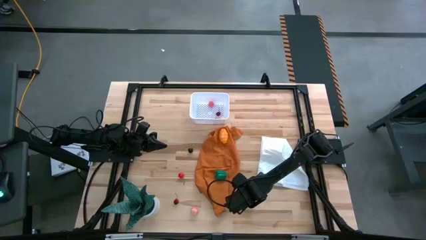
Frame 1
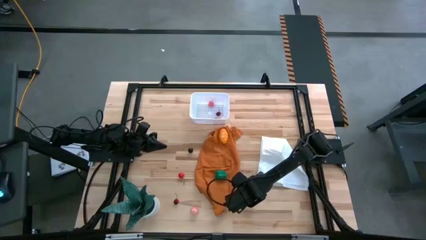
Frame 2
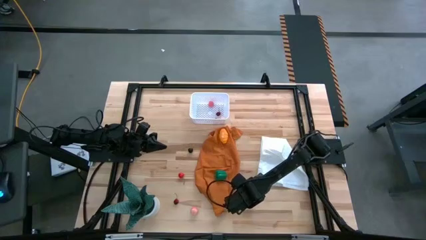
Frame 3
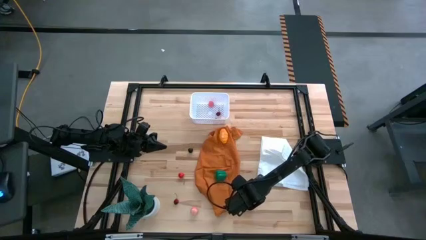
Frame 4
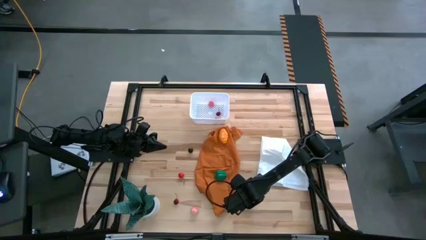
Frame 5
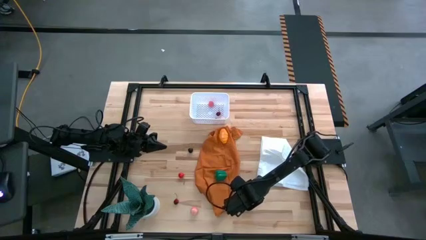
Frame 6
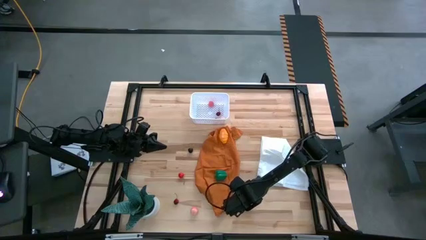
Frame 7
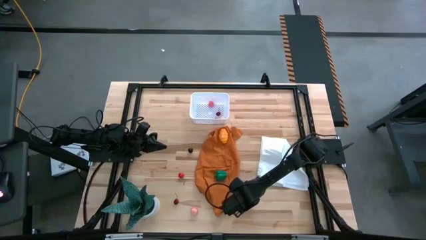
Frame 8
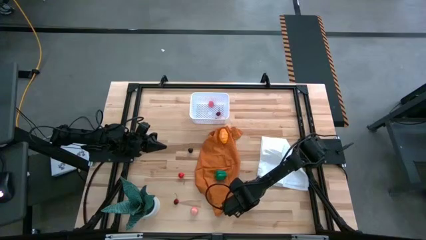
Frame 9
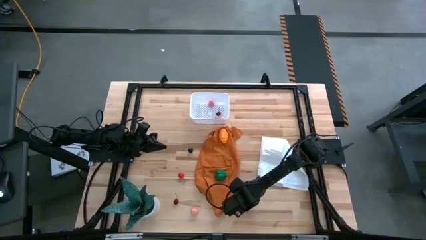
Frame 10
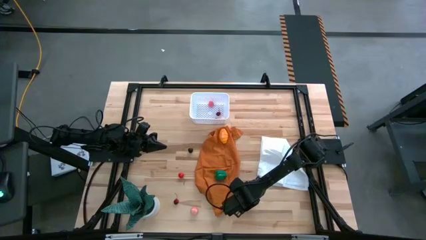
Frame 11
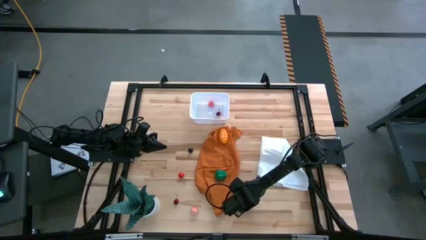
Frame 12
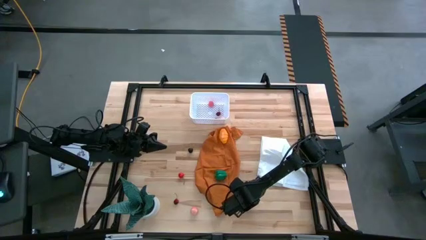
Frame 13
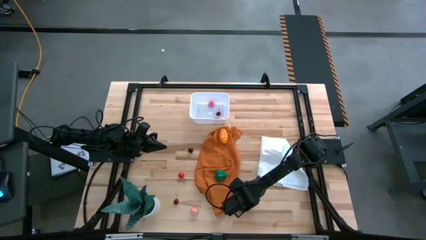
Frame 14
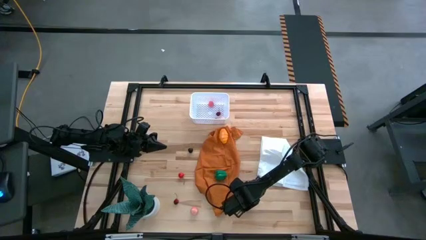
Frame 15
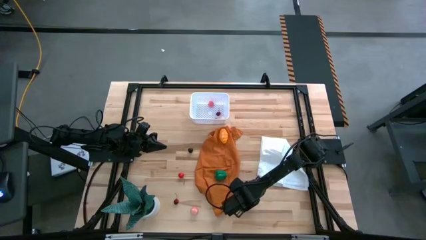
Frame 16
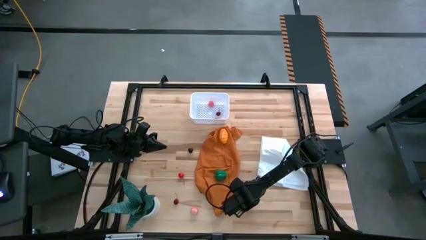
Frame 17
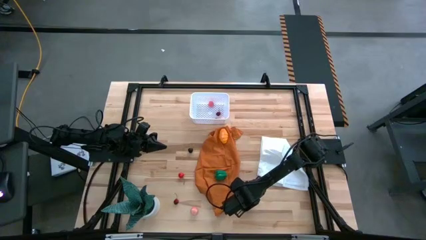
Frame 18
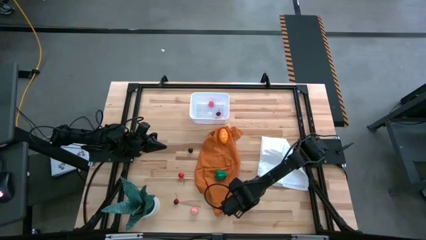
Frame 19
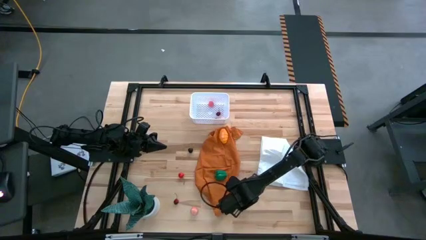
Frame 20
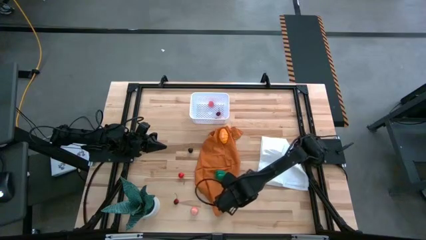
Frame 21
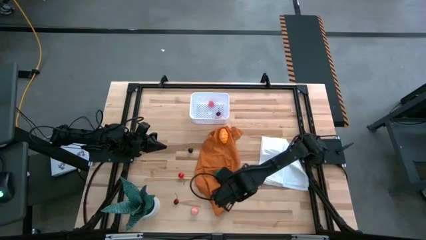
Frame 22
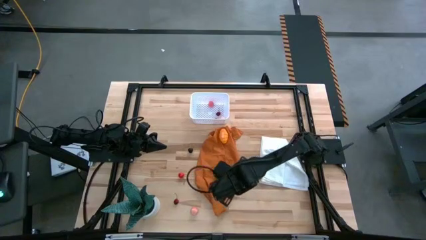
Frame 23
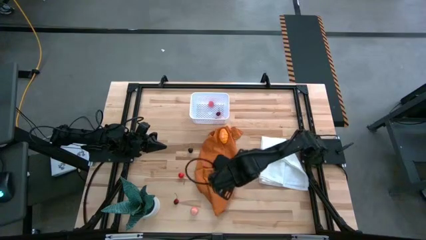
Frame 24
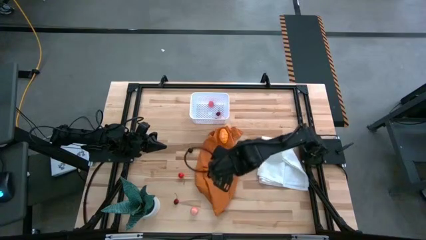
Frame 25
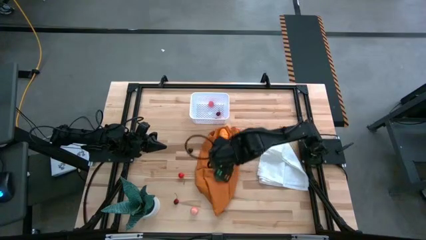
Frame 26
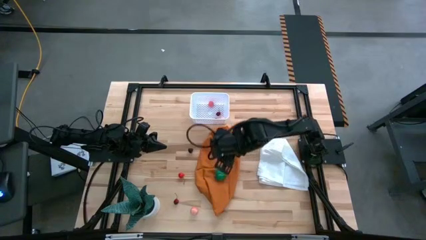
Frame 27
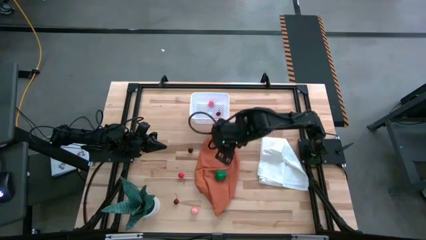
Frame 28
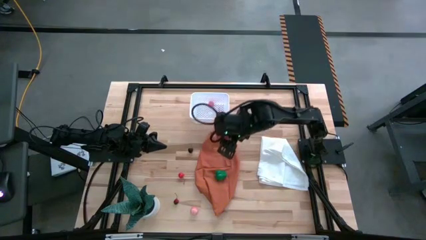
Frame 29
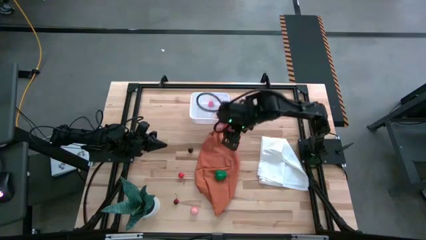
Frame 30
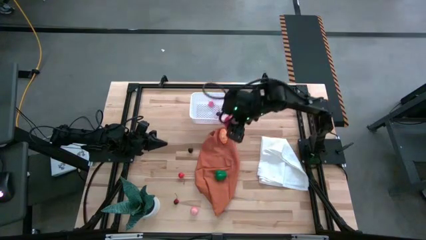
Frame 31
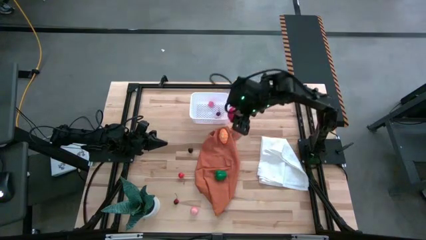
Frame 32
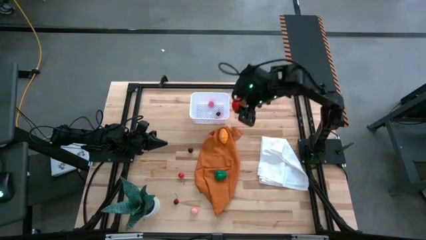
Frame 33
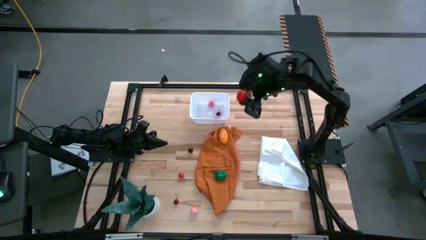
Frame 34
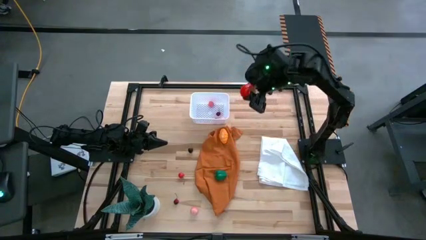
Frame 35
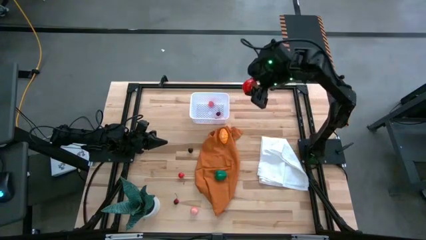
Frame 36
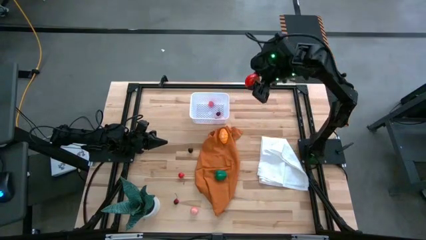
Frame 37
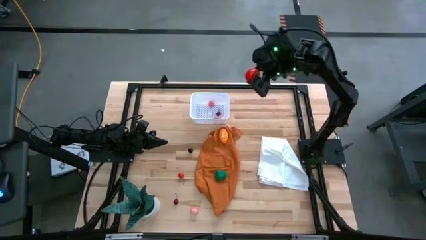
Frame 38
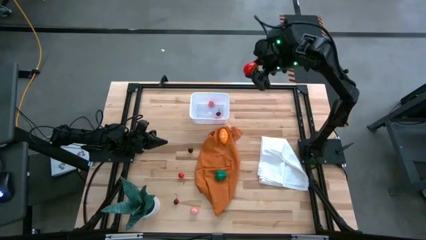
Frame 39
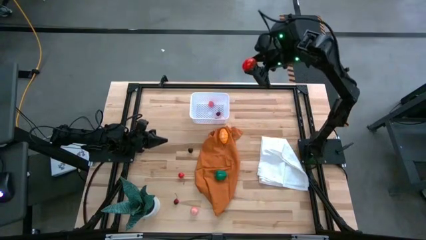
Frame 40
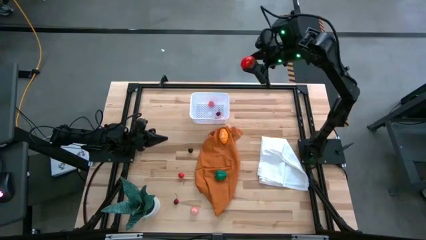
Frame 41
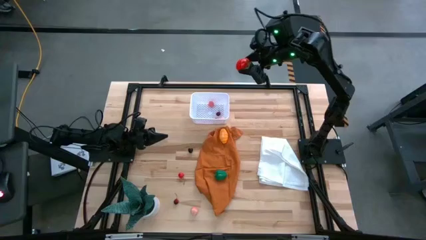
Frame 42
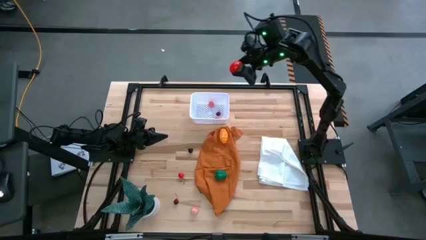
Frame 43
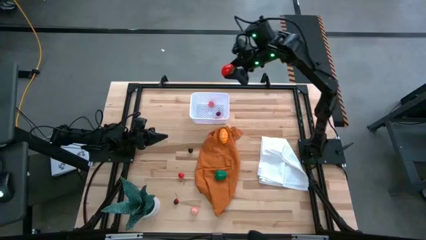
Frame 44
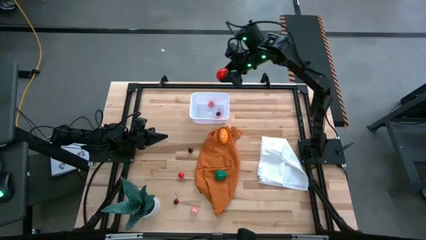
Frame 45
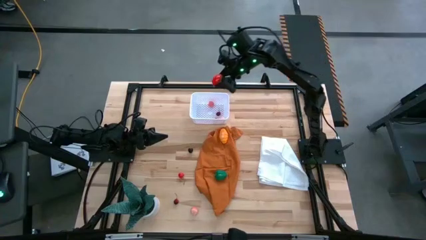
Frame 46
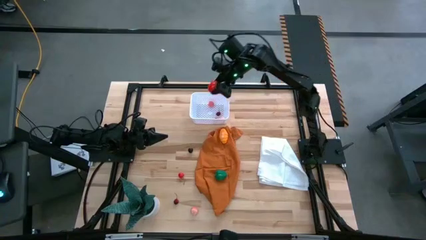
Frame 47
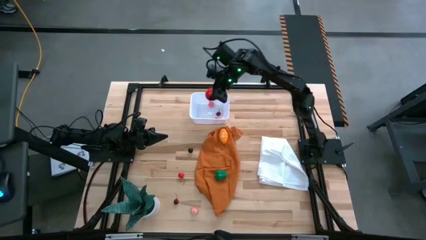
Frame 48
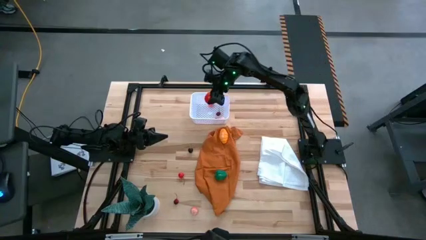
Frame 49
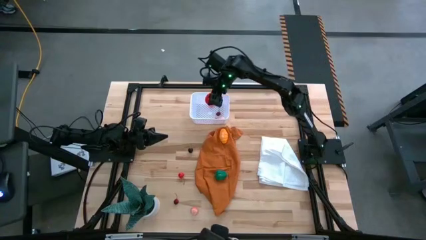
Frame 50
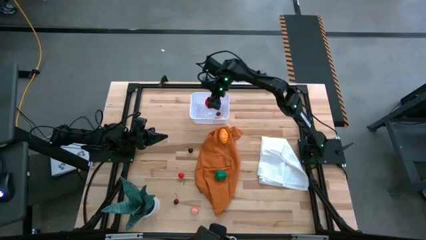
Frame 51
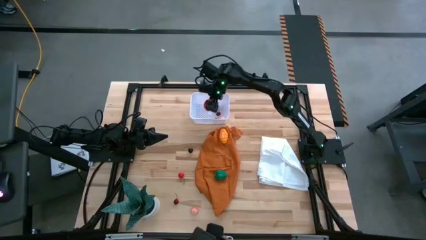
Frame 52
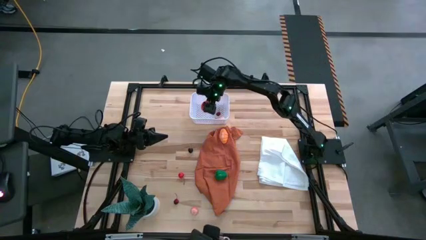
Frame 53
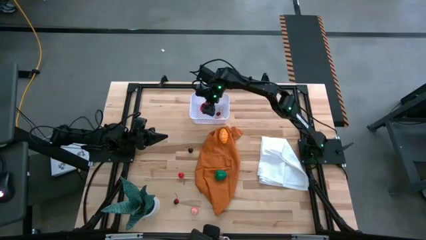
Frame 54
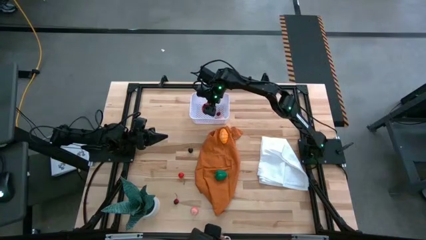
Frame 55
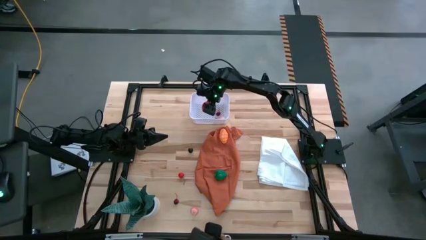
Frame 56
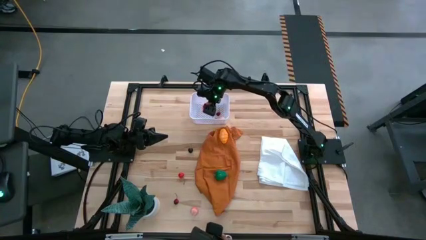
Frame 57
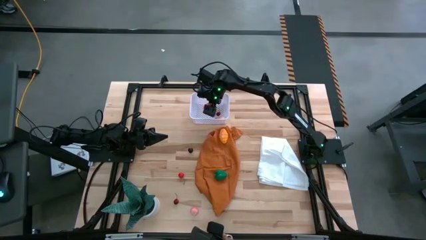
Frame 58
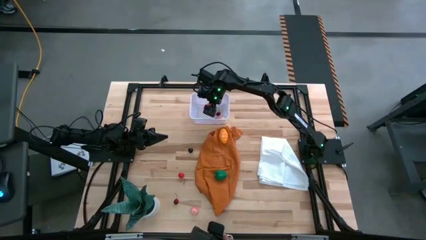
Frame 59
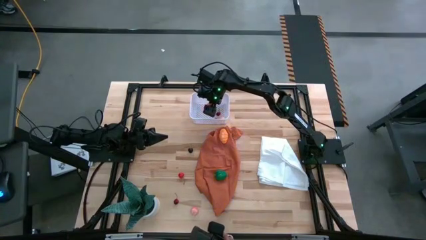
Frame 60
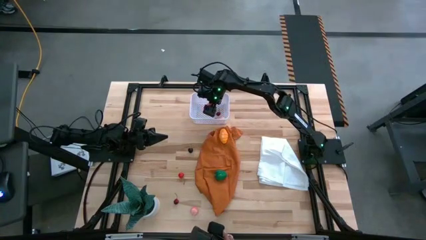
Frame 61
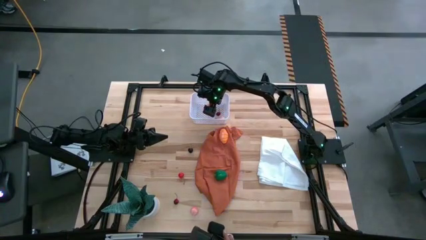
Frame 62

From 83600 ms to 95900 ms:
Task: Pick and placing Produce into tupperware
Put the red tomato into the white basket
